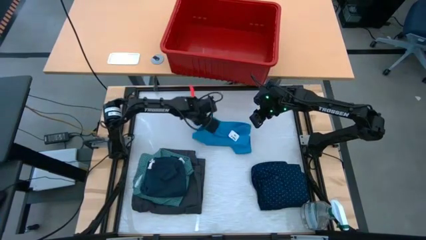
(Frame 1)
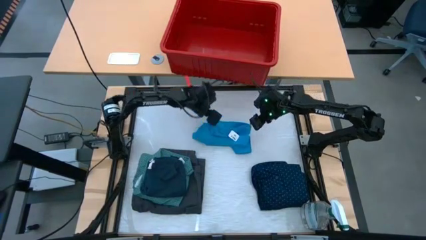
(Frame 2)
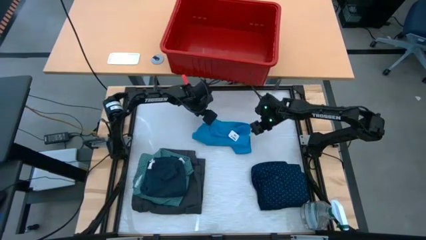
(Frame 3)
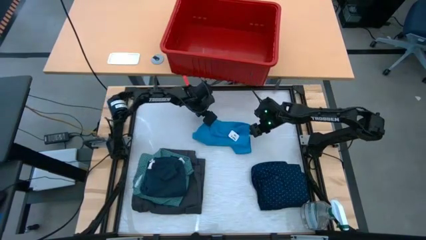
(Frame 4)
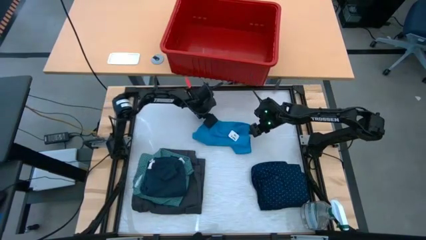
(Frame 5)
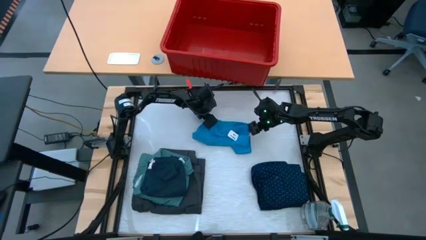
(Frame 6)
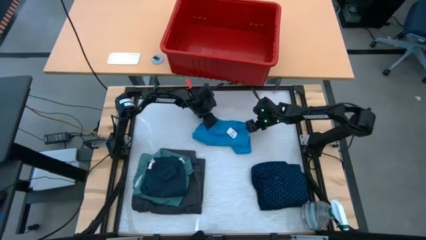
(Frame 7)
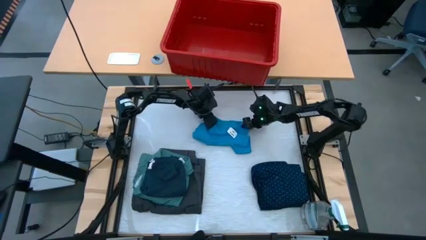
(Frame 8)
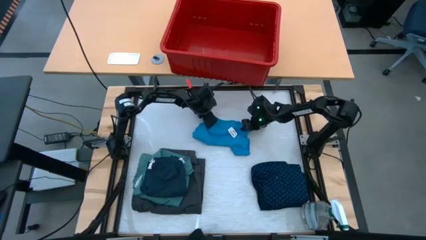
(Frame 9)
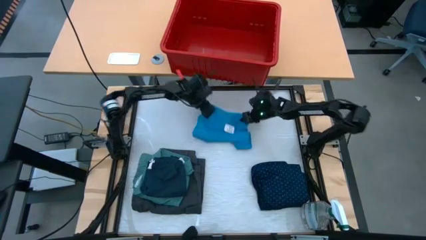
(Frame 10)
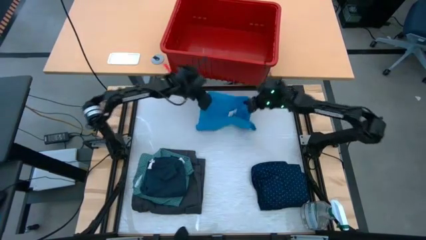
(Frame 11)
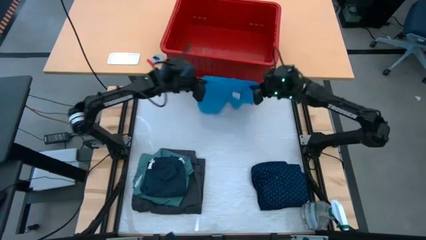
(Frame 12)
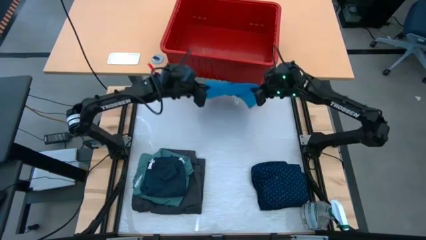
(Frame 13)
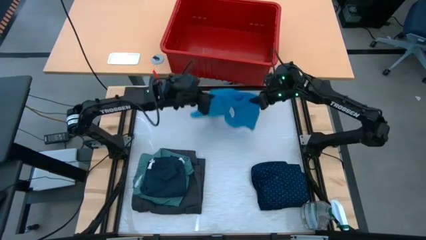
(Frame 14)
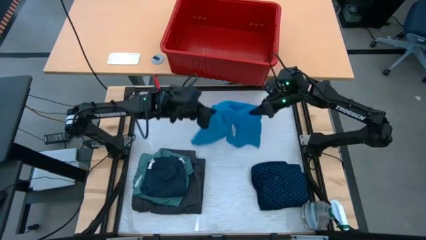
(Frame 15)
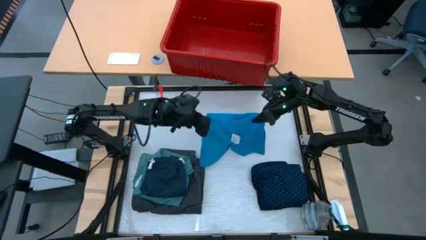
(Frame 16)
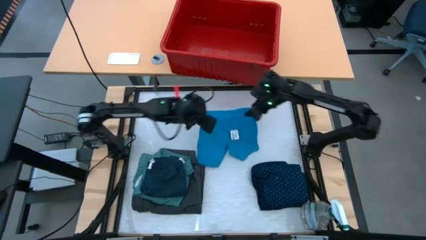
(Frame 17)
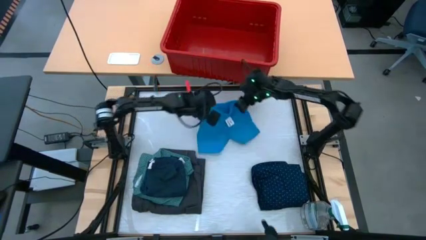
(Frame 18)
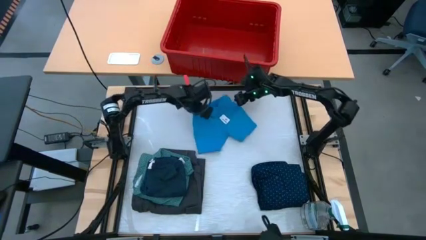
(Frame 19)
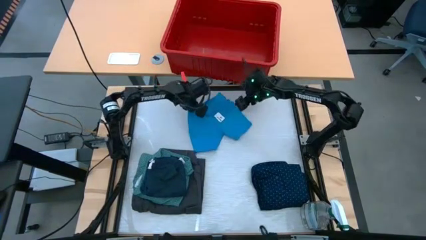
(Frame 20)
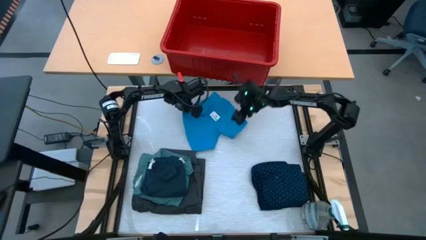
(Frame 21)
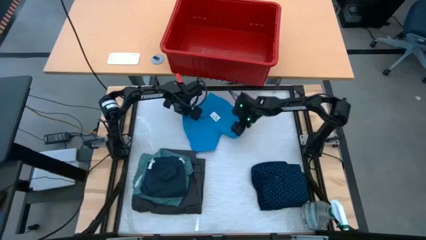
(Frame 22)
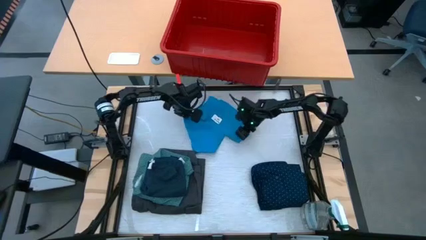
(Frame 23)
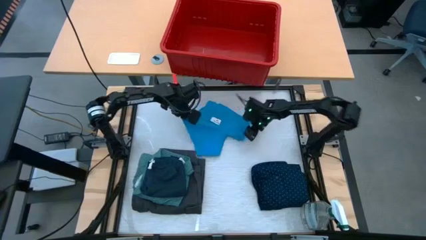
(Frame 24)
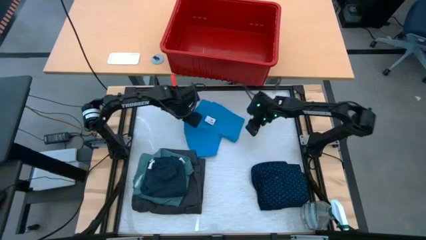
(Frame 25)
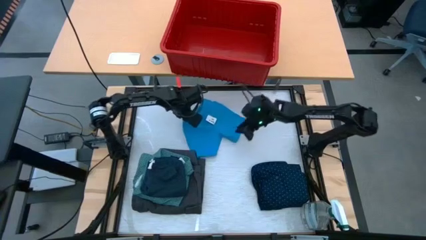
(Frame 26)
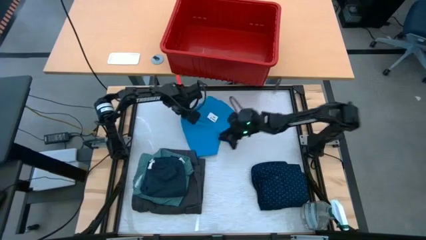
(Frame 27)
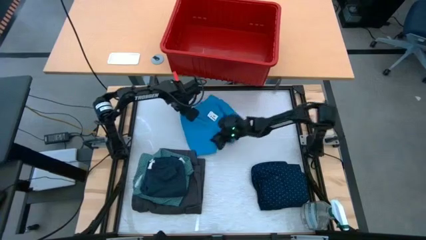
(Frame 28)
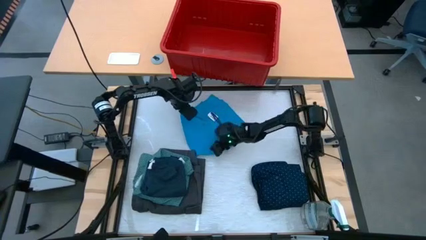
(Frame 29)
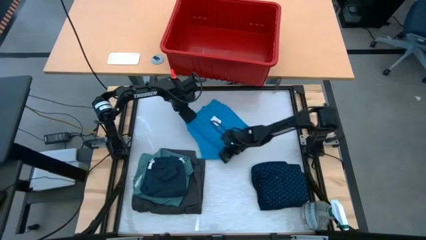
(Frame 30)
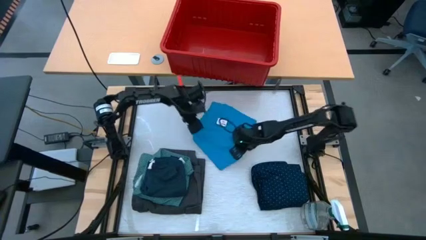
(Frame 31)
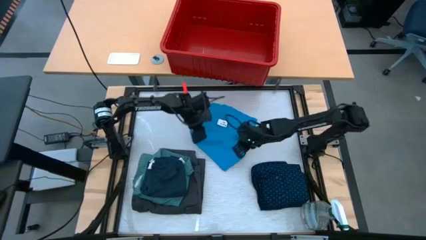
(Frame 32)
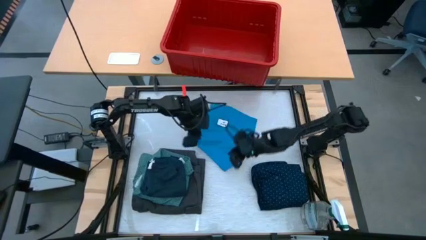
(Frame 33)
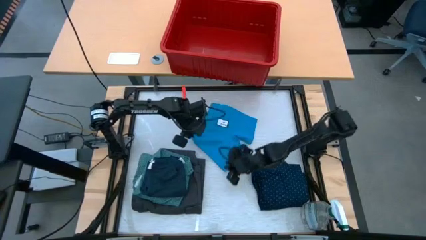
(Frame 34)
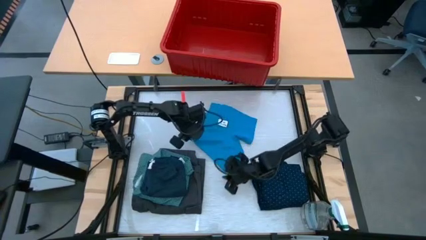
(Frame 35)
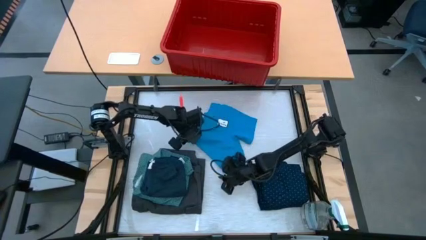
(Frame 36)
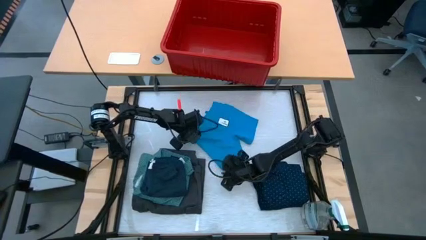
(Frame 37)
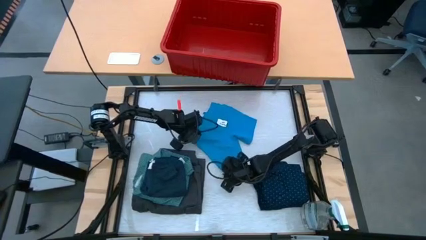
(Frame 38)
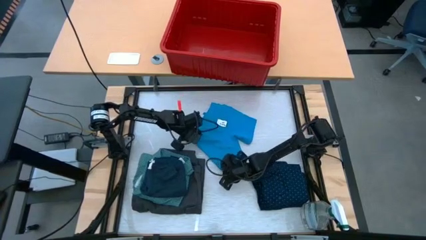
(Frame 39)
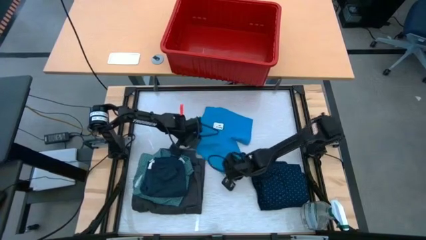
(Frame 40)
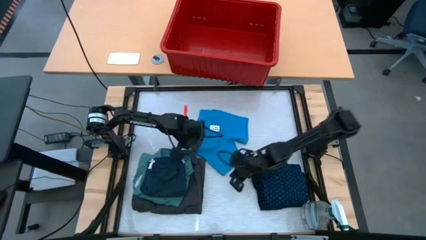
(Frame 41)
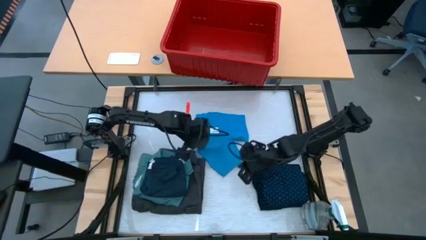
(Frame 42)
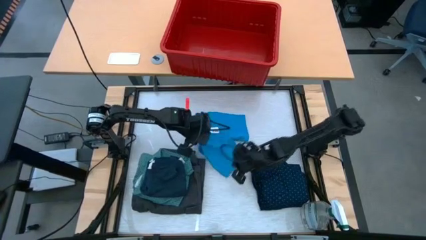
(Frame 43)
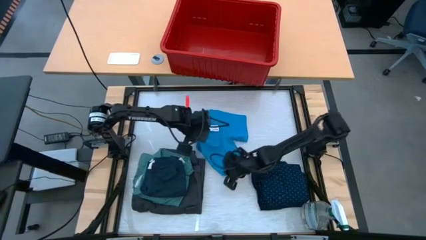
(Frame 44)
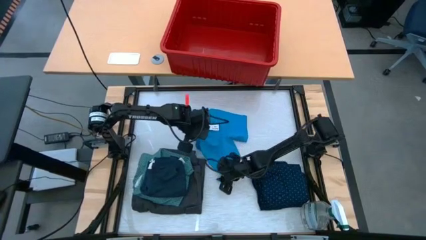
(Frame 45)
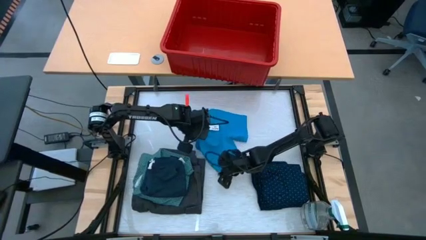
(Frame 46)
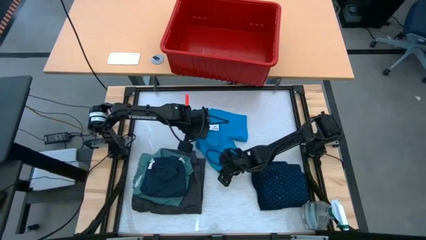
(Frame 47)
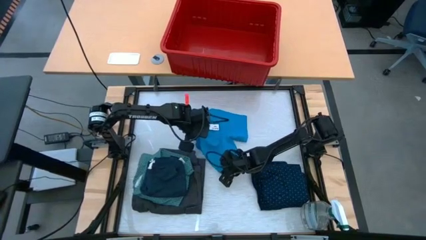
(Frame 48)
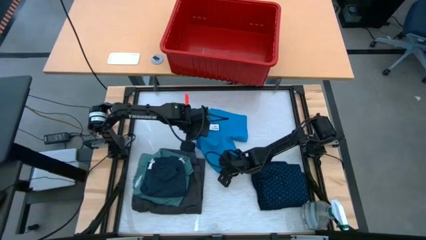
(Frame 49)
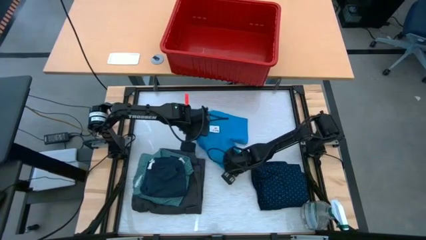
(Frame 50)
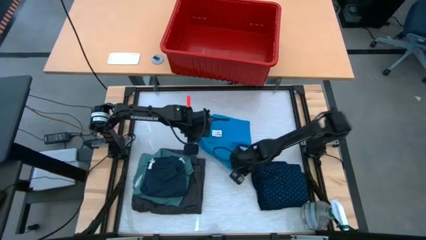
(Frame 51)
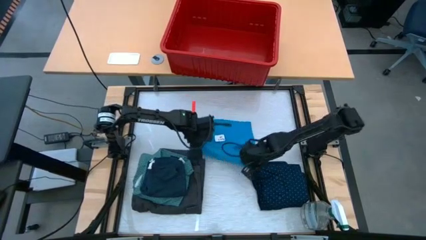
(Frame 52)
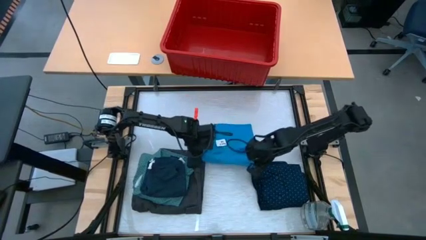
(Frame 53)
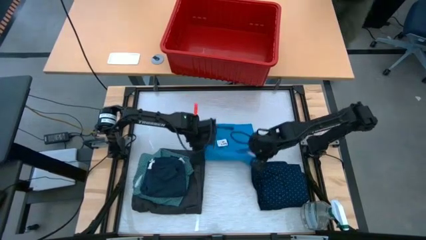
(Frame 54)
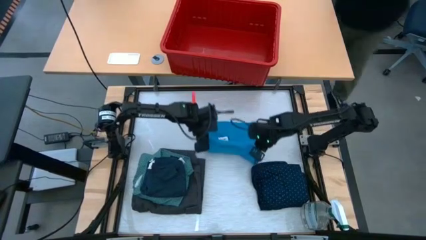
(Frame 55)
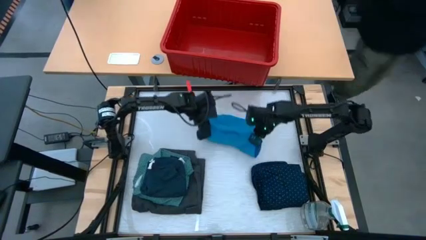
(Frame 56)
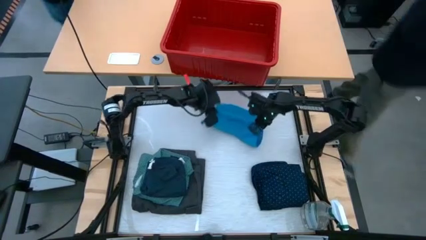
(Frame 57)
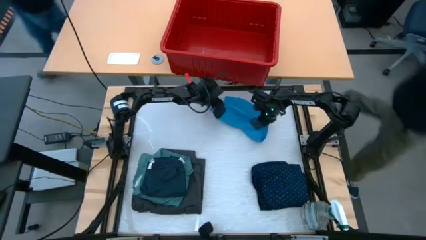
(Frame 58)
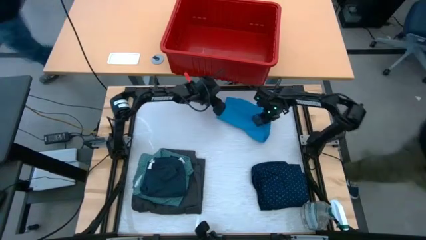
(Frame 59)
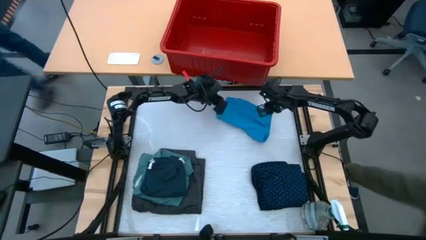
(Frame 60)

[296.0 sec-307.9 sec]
Task: Fold laundry
Fold the light blue shorts

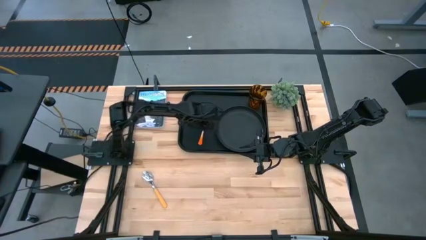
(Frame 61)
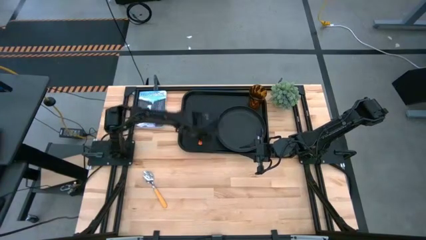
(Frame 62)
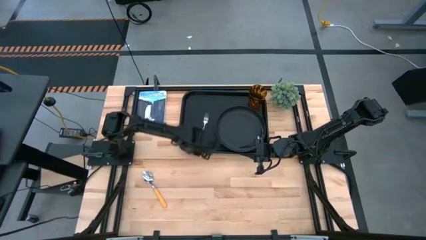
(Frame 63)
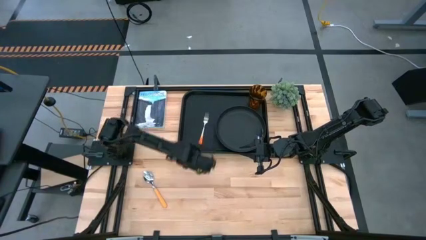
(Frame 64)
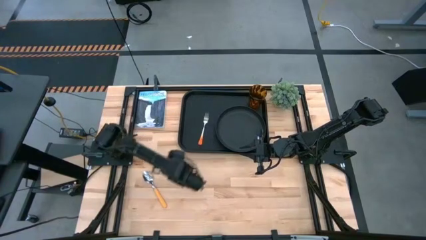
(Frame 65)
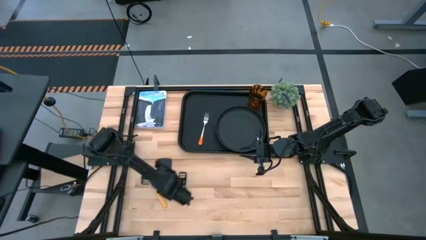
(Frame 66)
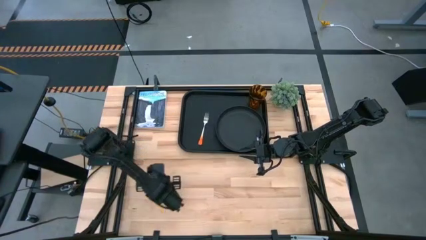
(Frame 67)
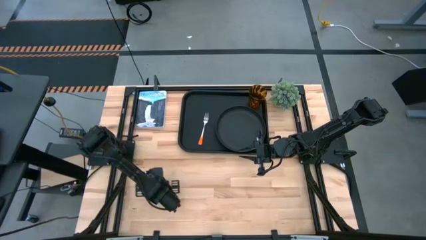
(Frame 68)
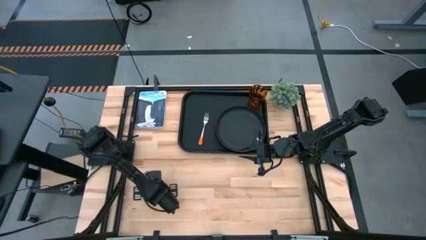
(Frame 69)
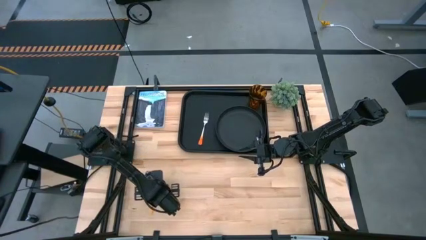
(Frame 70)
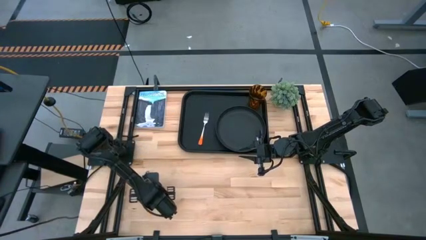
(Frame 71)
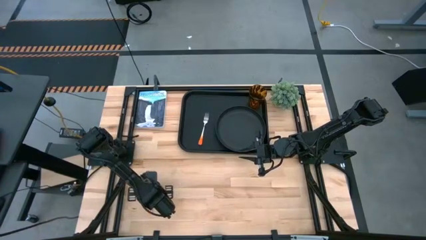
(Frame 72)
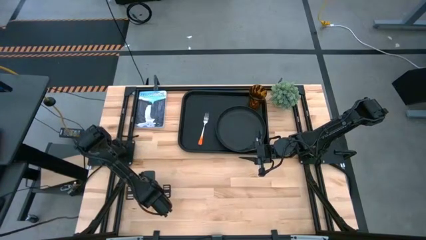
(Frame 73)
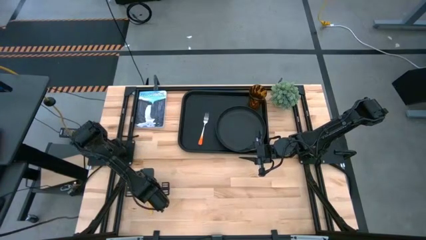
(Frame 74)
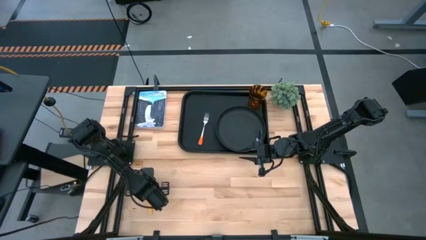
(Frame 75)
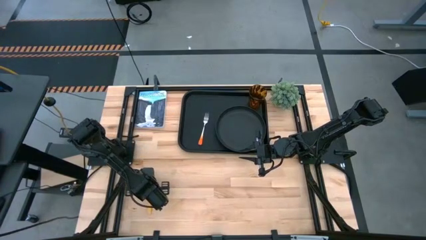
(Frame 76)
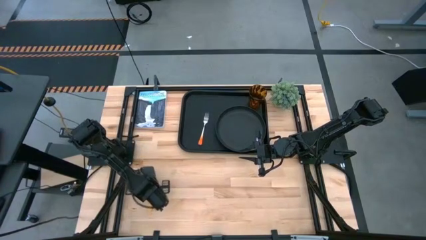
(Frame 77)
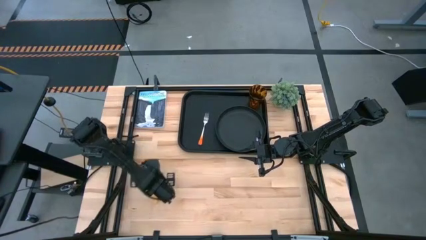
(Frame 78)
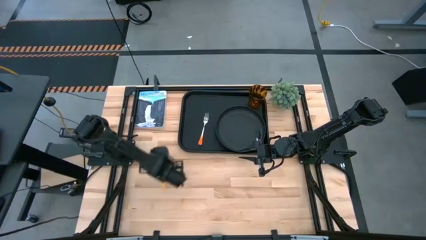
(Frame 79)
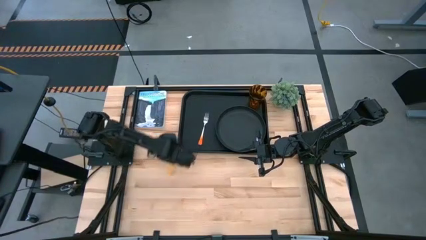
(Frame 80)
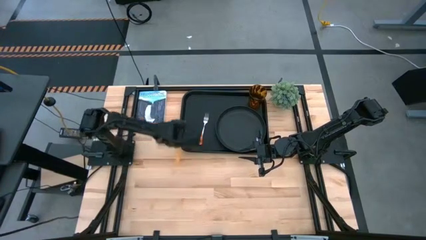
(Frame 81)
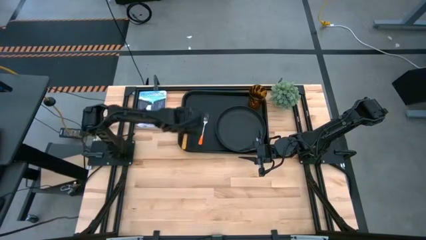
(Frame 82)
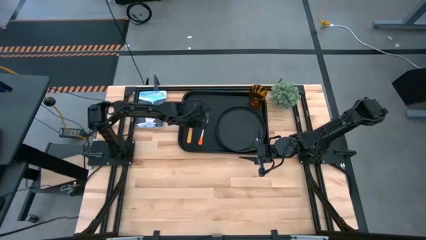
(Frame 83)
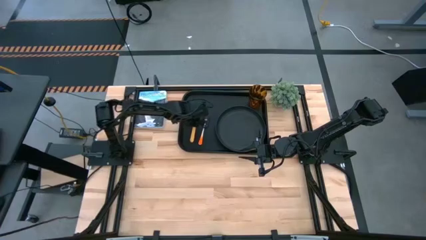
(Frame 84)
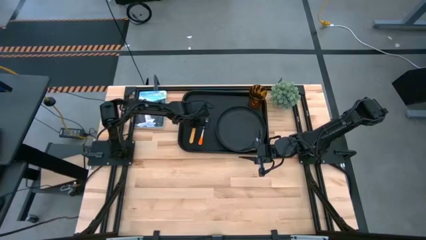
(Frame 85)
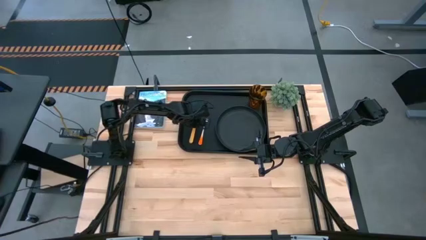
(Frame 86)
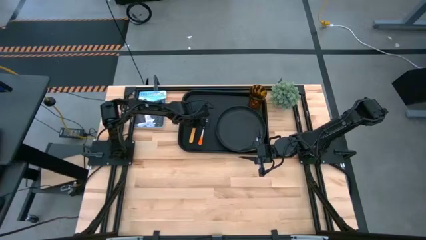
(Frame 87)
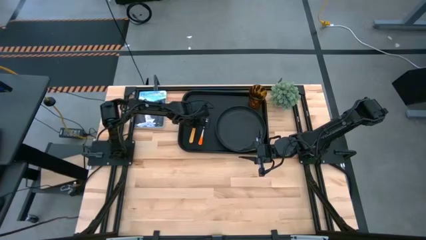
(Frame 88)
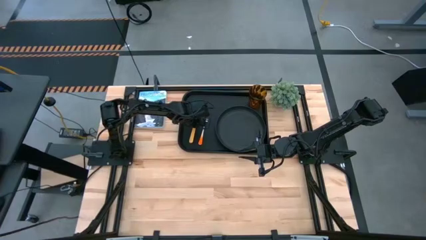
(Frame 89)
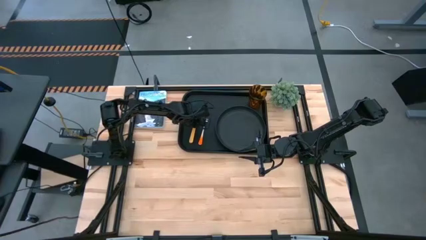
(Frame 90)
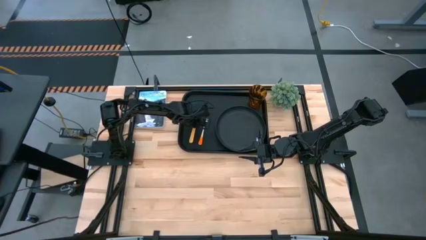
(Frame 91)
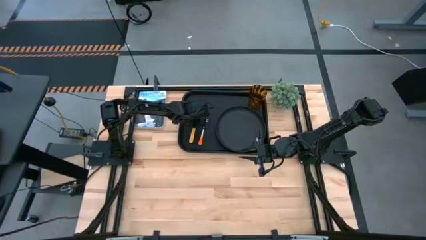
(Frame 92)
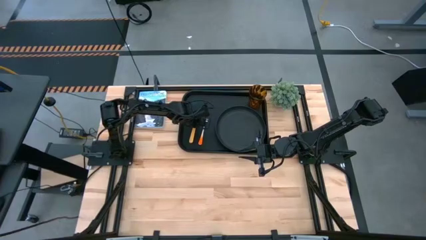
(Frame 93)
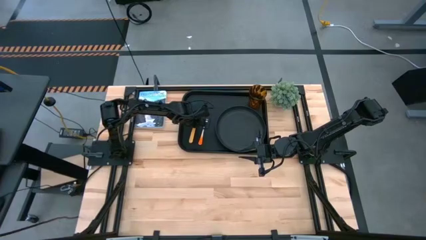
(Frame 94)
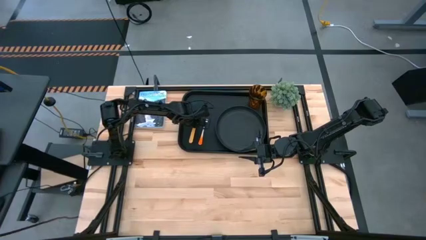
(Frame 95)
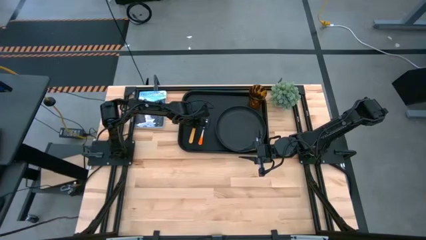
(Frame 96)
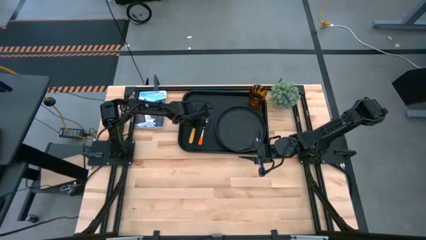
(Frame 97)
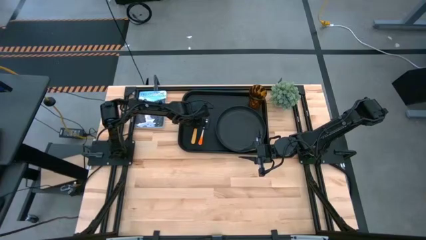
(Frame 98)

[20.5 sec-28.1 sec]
Task: Pick and place plate/cup/fork/spoon on tray
Put the yellow spoon on the black serving tray to the left of the orange fork
